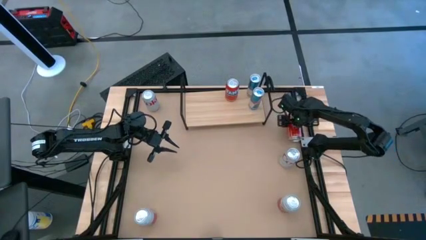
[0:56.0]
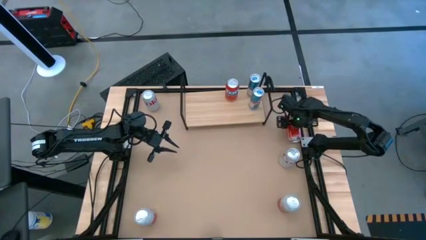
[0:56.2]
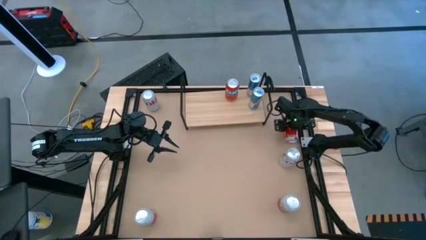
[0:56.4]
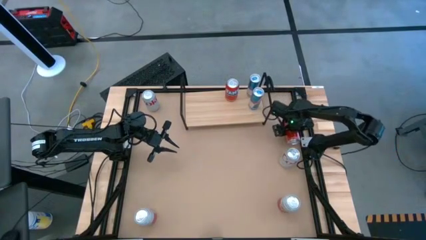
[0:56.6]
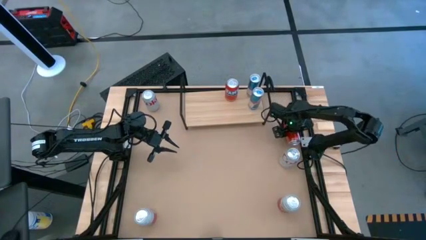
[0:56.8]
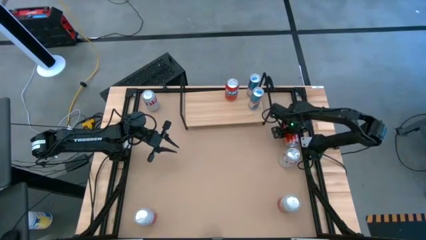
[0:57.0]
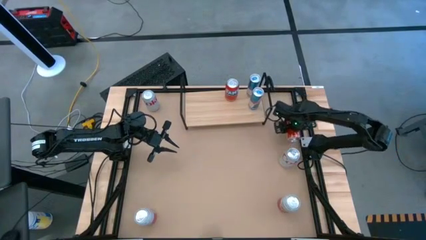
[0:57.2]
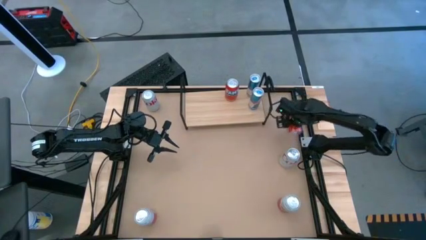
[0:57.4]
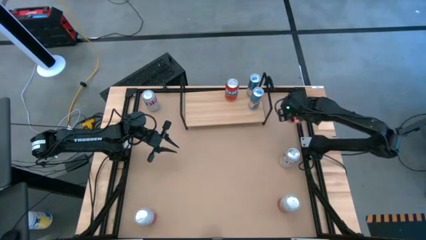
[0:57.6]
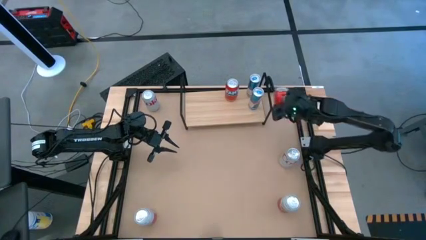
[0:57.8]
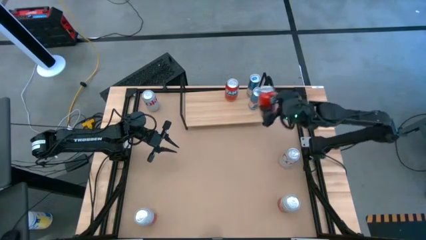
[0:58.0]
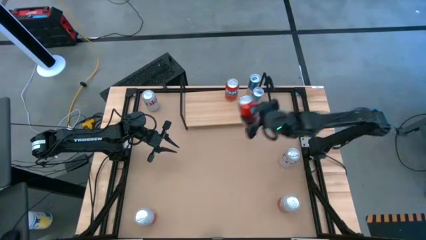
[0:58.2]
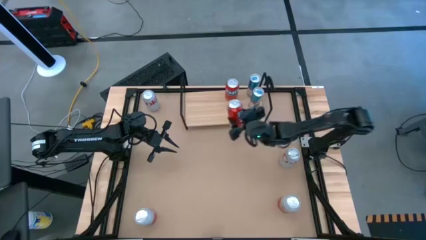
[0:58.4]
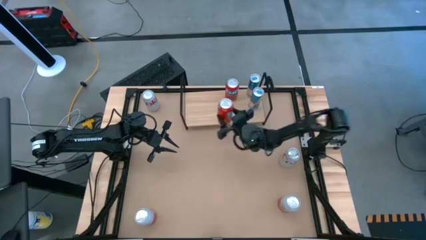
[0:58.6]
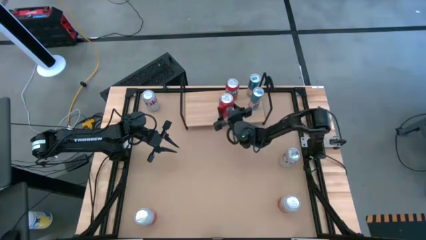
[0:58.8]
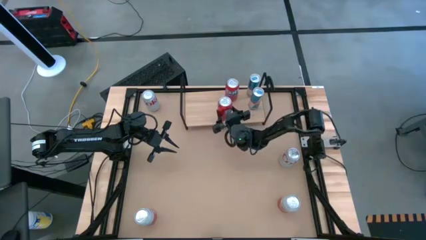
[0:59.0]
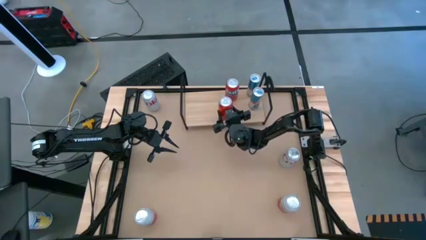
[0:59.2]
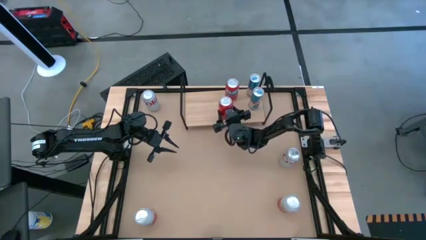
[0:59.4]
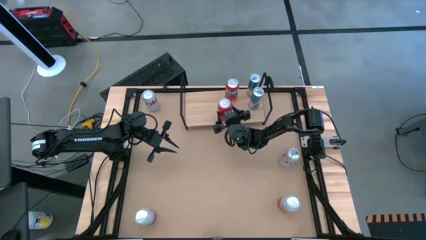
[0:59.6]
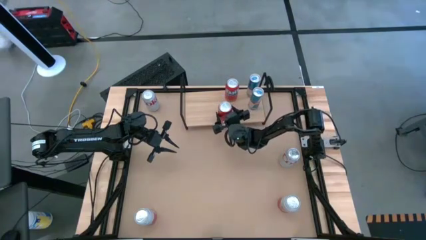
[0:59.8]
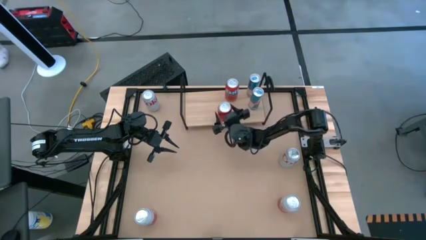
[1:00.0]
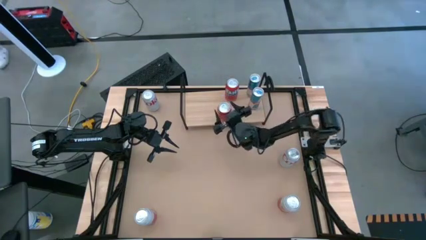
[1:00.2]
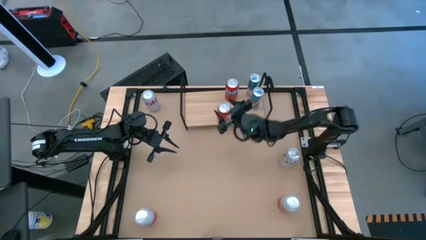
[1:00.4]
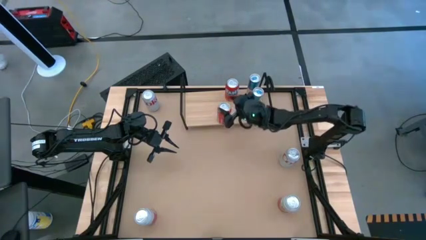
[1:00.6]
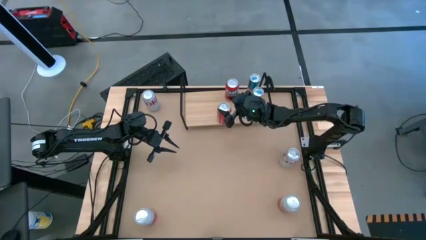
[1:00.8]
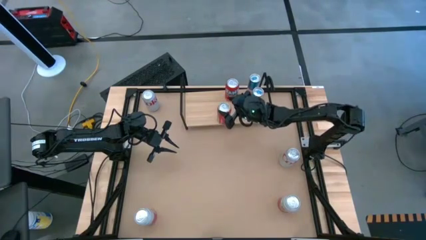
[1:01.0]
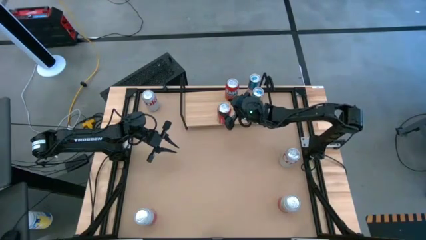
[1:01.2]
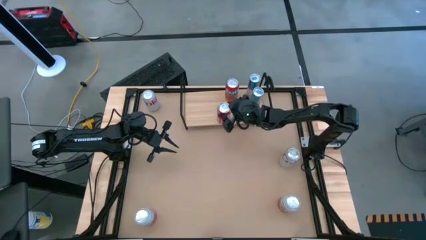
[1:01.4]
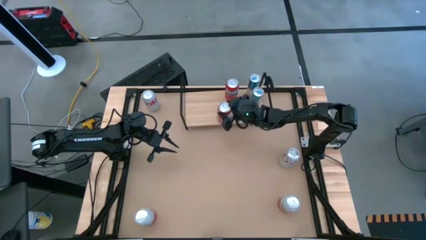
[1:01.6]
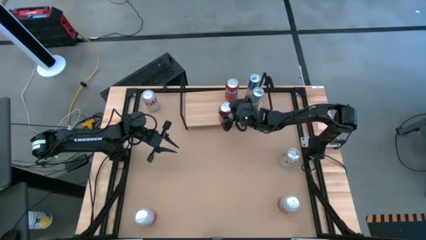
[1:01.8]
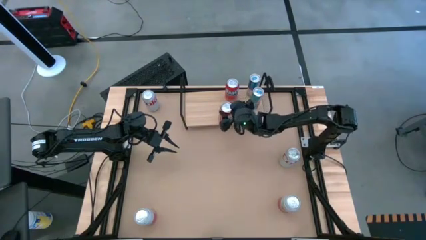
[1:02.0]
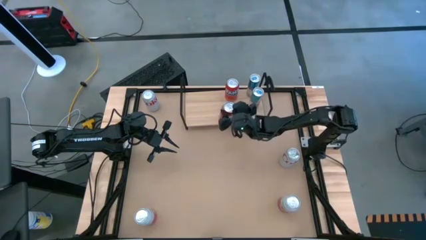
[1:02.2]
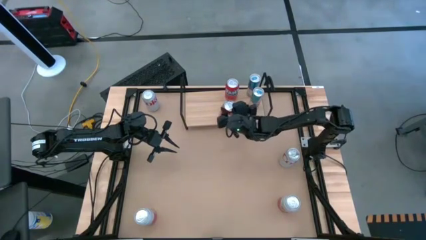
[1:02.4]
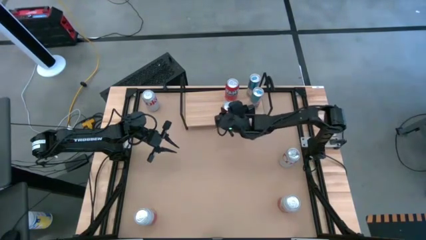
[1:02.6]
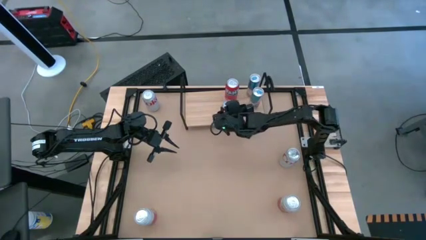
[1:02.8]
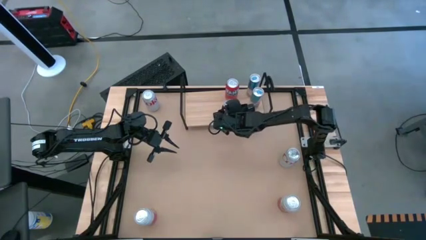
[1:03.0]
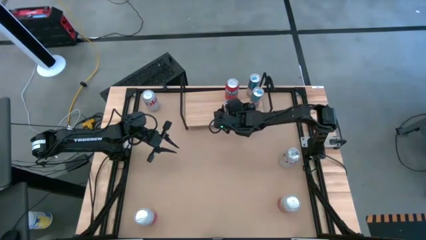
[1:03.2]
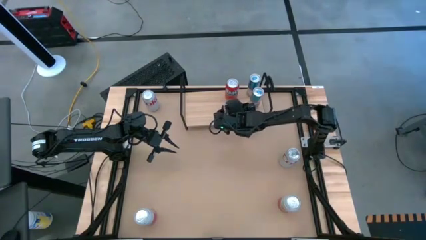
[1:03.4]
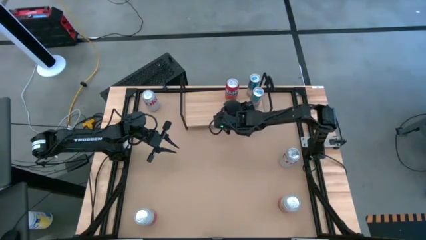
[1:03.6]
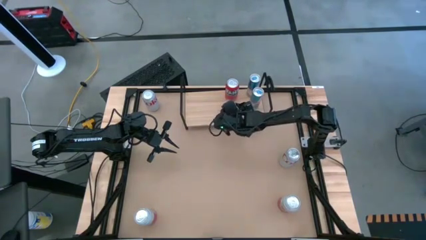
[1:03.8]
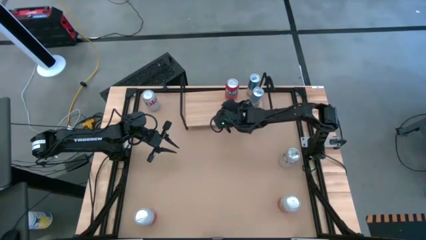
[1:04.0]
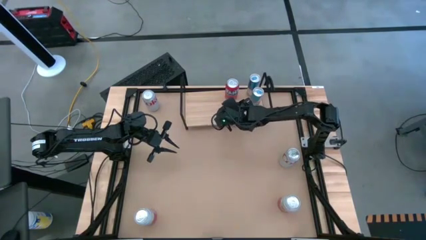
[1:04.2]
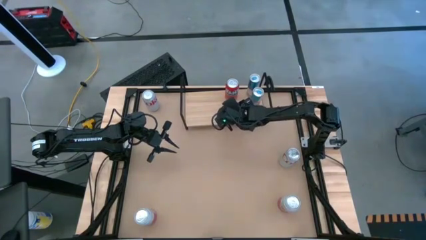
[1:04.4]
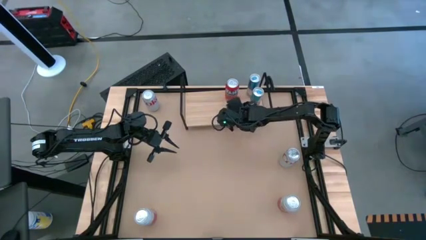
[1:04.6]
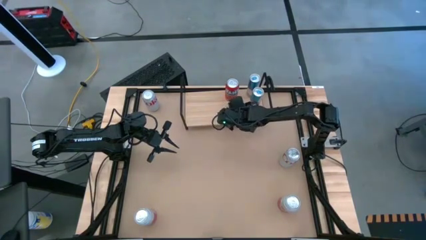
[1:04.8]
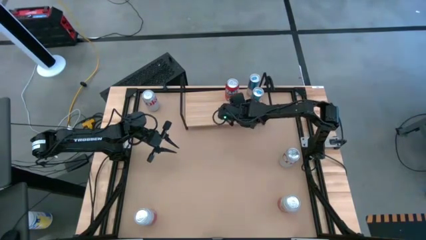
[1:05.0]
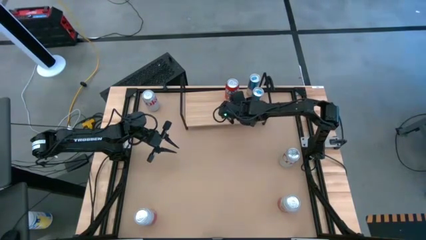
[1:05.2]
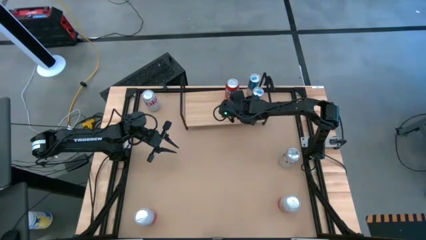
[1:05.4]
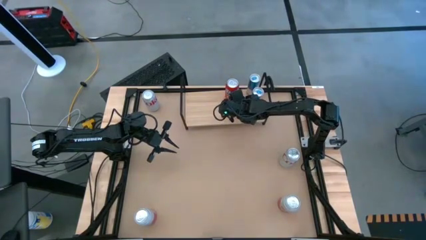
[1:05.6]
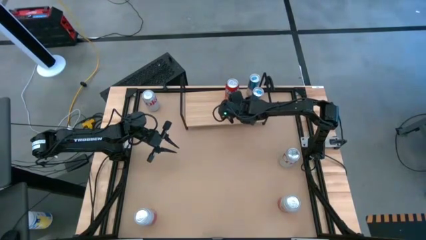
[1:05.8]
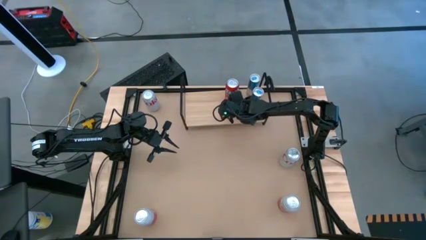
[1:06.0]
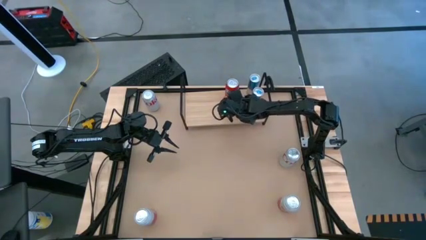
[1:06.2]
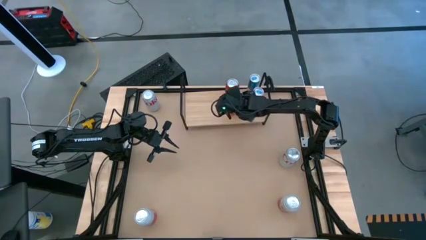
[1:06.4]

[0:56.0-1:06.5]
Task: Place canned beverage on shelf
Put the orange soda can on the shelf aligned with the other orange soda can on the shelf

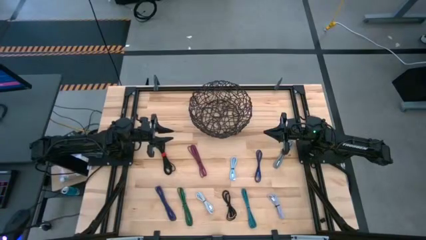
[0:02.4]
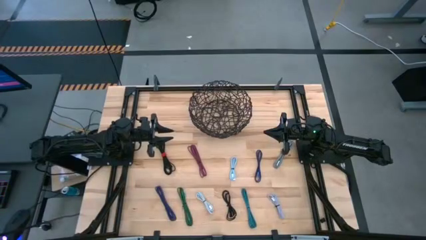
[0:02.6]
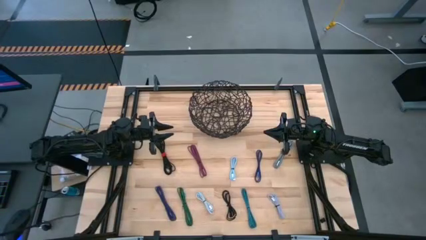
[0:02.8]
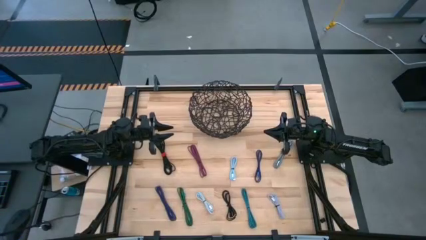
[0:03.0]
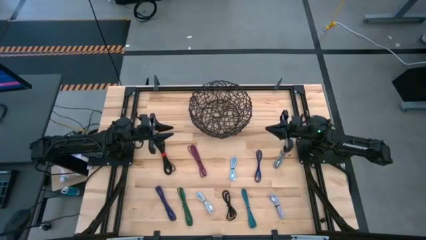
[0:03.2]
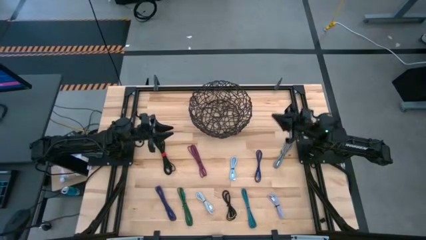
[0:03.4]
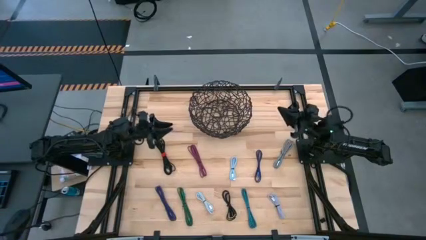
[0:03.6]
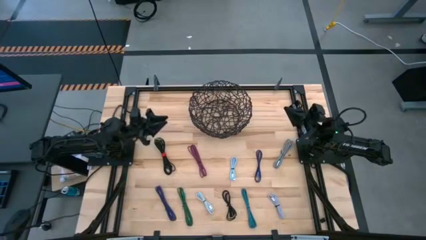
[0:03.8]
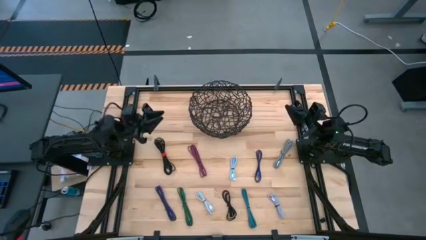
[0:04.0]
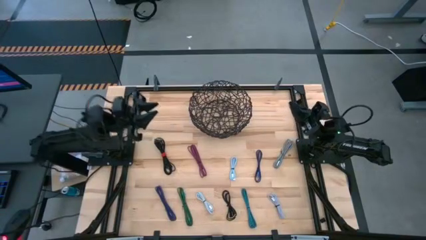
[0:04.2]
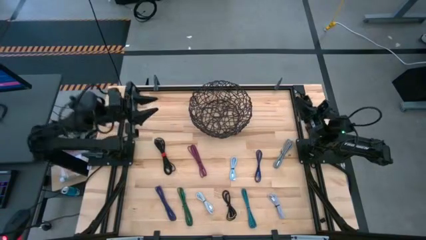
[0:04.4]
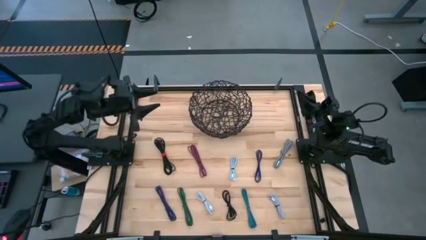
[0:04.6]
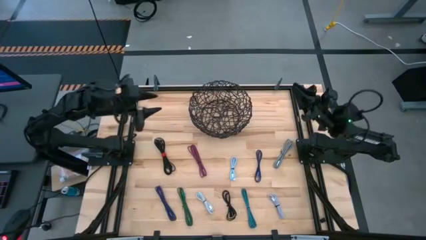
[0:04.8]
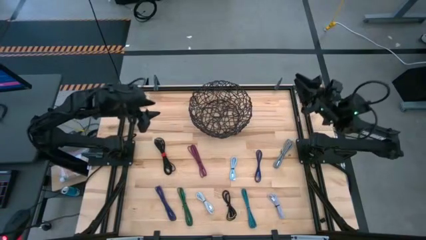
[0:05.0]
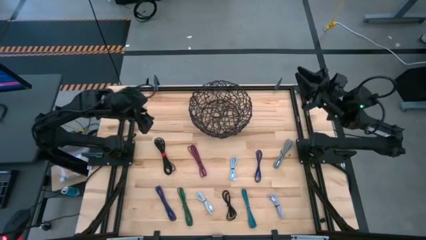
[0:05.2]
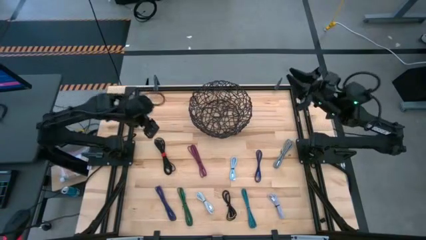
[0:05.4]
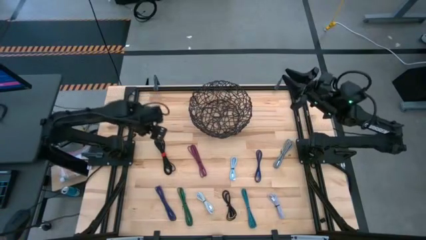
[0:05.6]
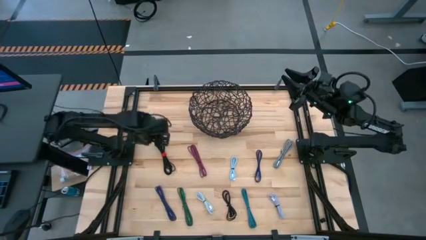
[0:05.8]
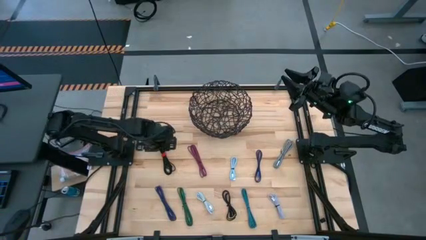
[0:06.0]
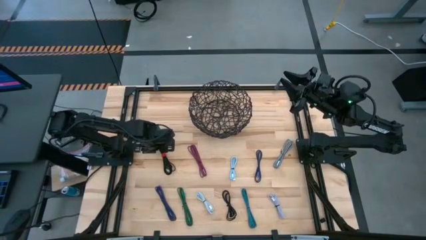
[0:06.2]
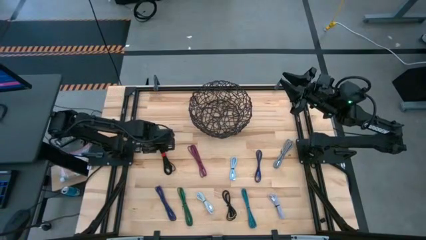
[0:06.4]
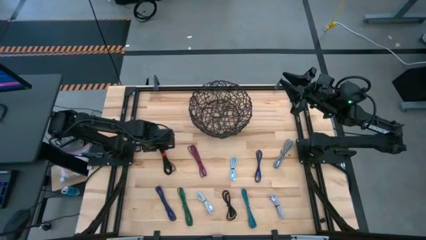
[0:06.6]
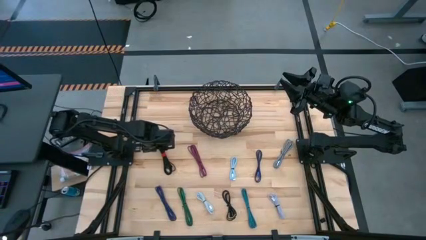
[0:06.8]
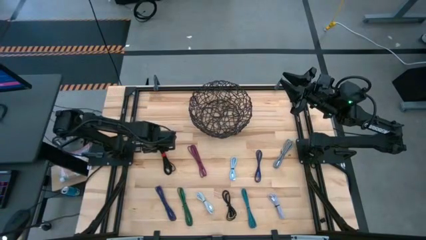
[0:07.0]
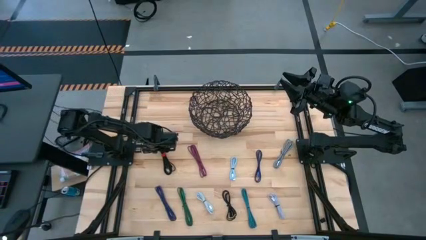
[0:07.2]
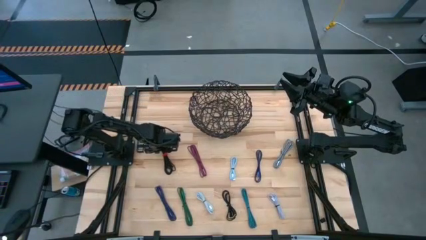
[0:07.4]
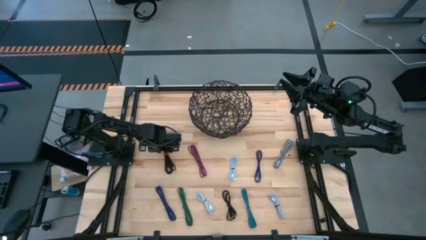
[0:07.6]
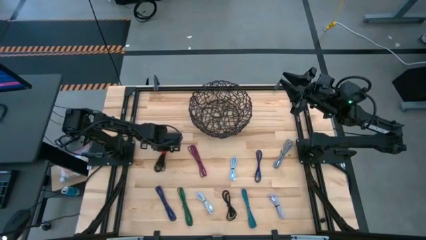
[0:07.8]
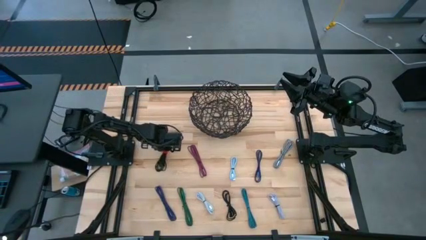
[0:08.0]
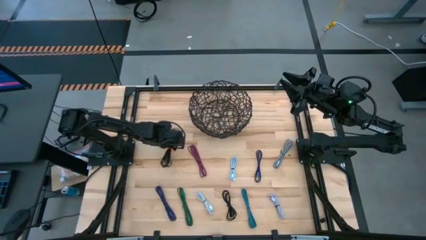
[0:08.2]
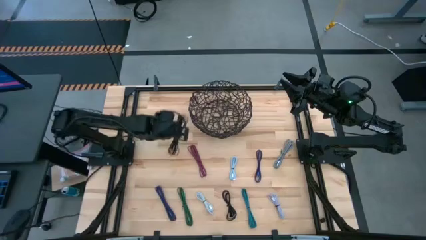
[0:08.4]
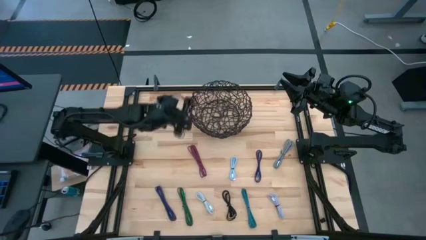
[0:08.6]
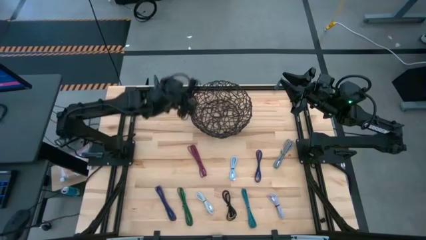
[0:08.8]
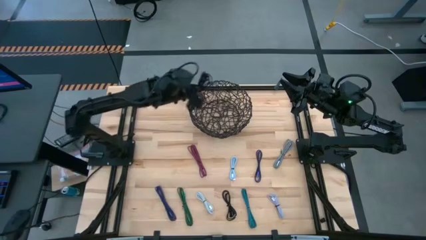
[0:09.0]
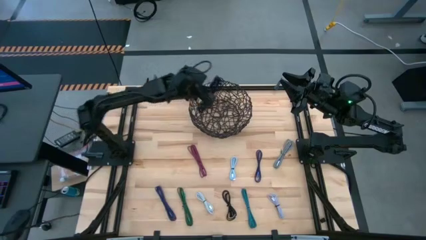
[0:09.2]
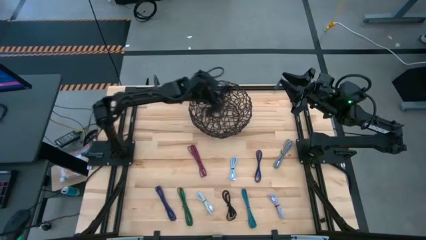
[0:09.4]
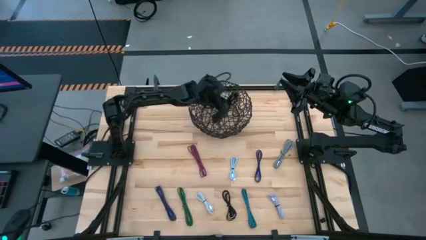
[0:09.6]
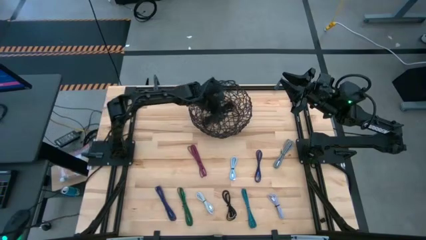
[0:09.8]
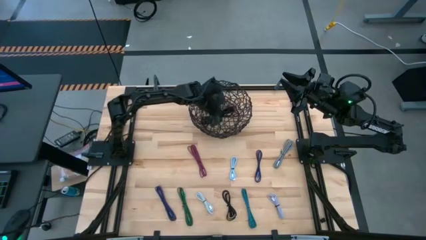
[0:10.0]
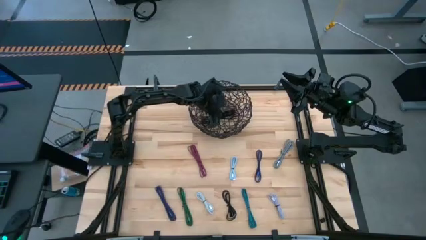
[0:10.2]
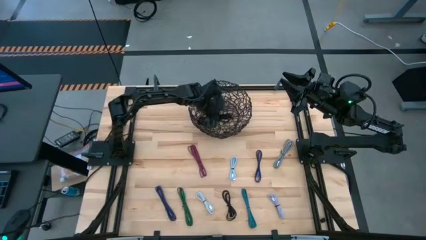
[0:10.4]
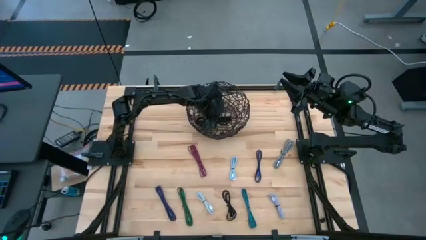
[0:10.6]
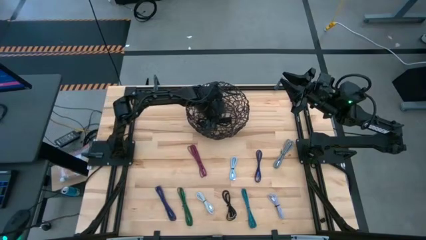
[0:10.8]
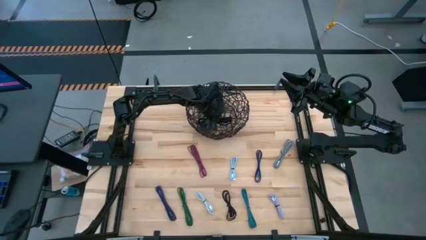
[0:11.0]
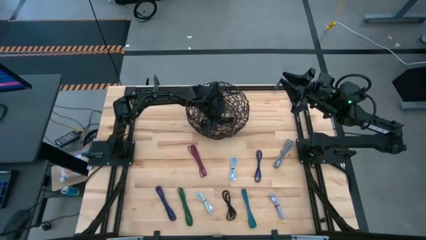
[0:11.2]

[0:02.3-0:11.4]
Task: Pick and place USB-C Cables
Put the top black charger cable into the black mesh basket
